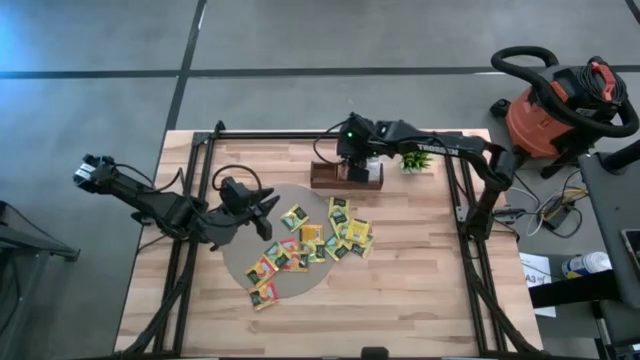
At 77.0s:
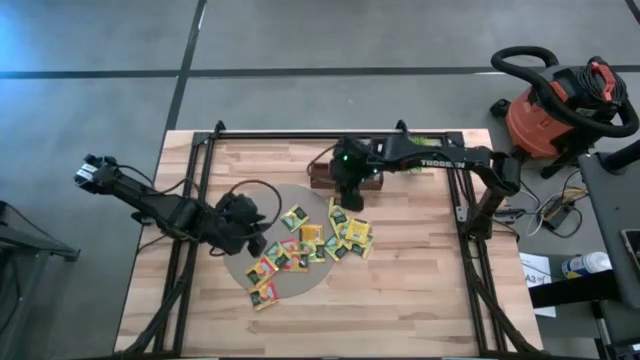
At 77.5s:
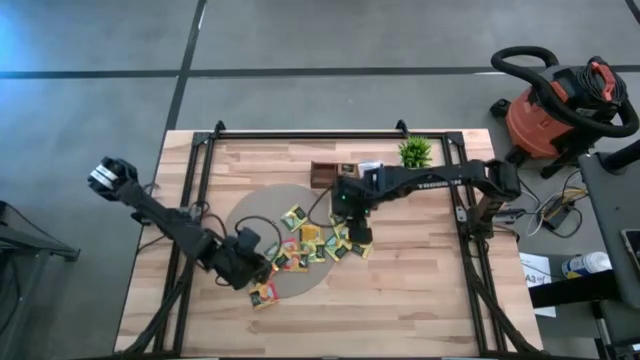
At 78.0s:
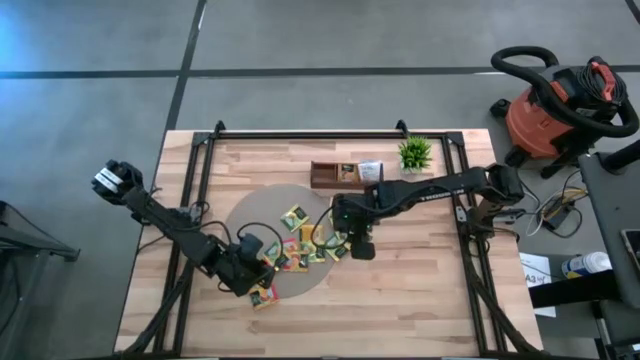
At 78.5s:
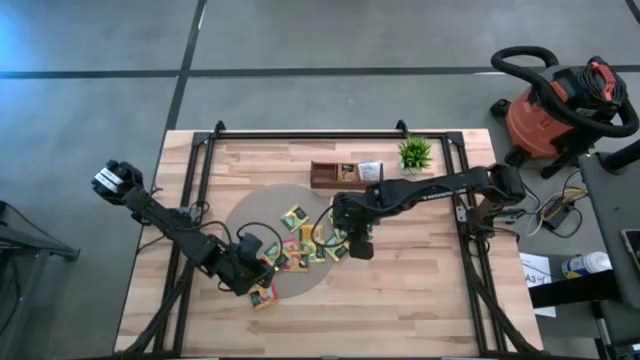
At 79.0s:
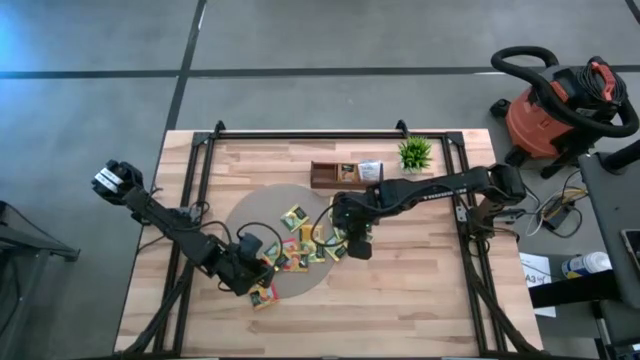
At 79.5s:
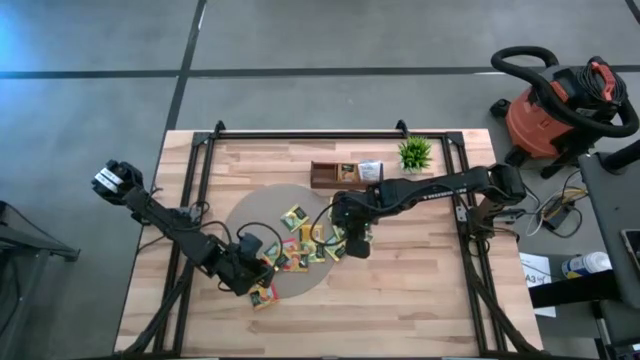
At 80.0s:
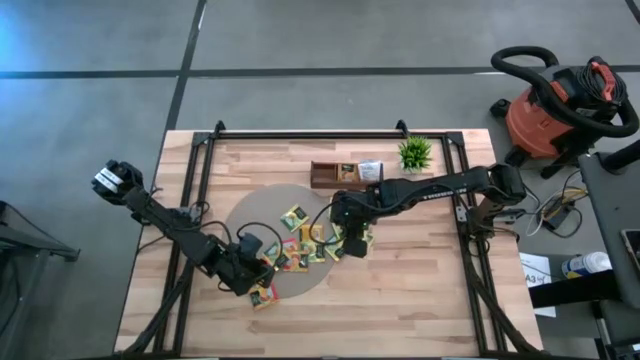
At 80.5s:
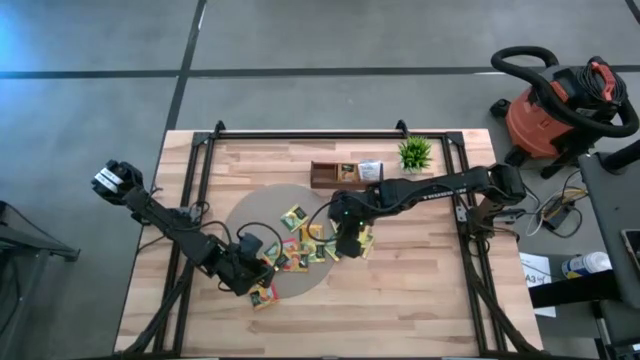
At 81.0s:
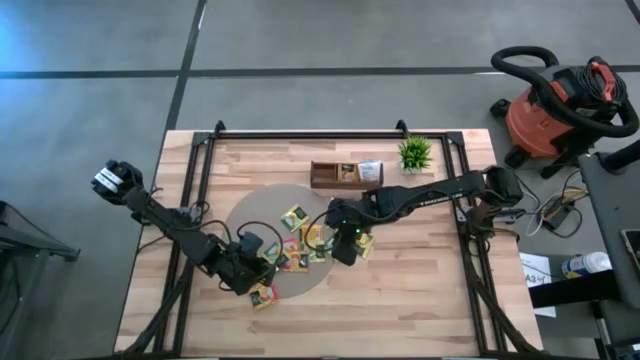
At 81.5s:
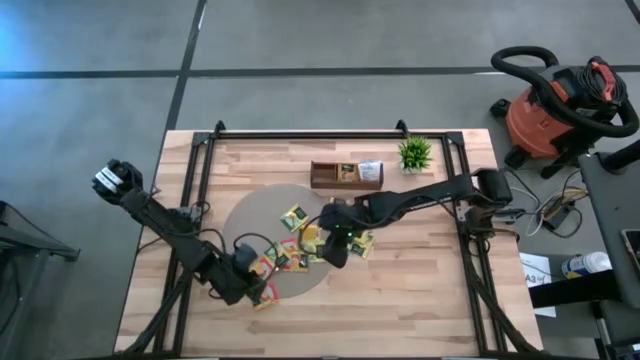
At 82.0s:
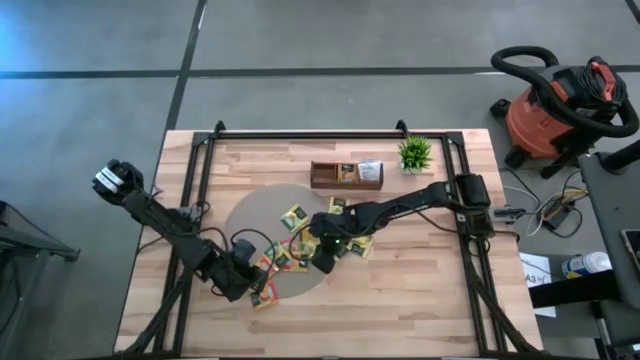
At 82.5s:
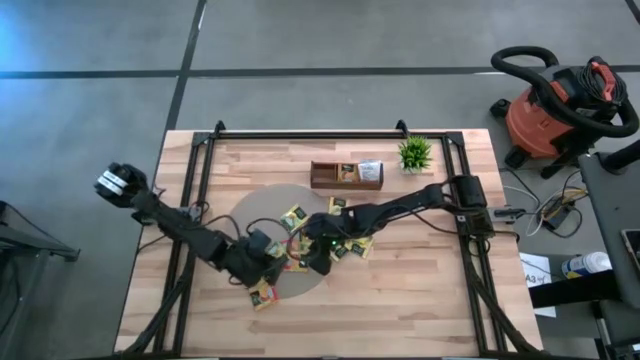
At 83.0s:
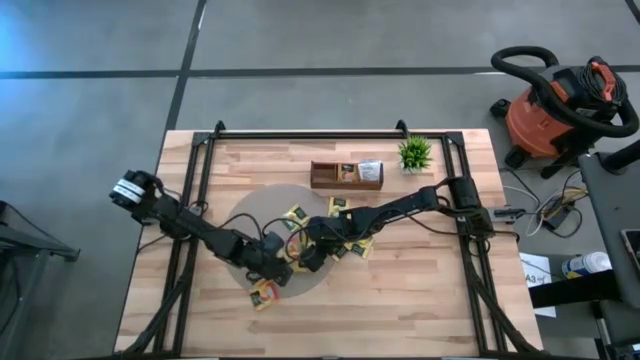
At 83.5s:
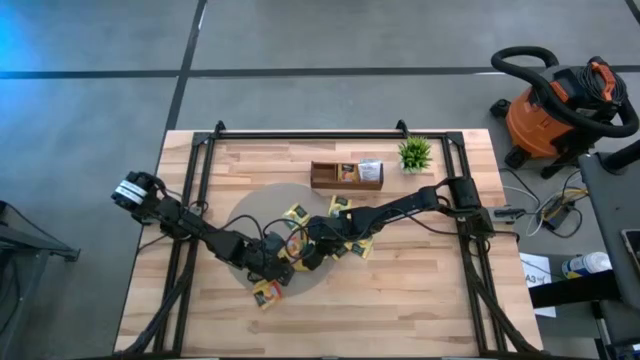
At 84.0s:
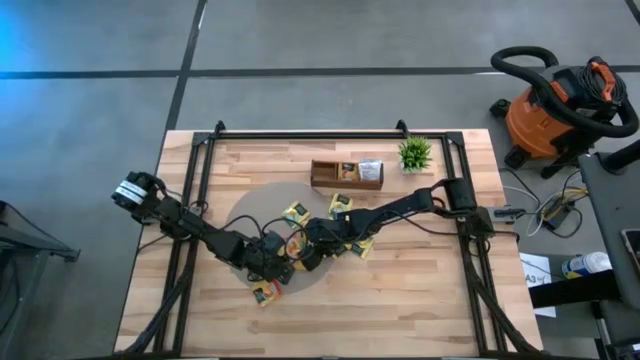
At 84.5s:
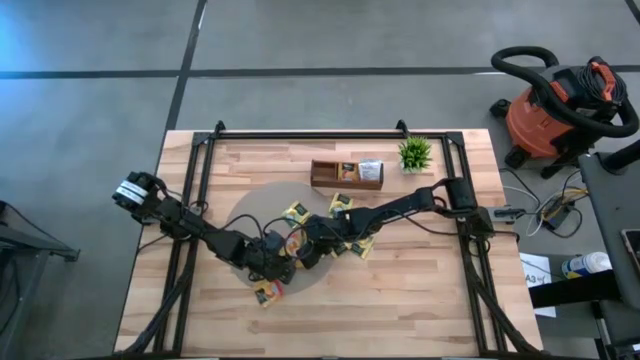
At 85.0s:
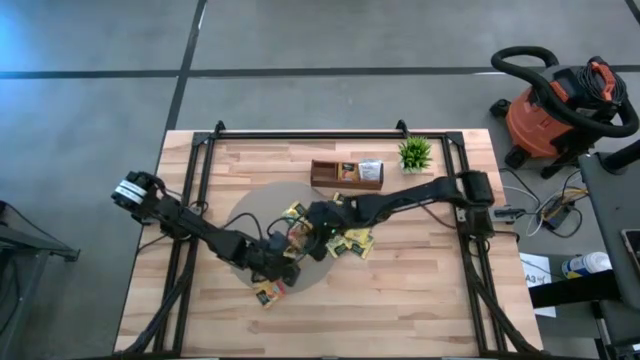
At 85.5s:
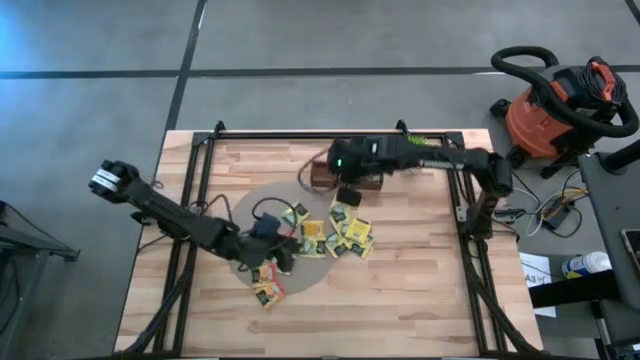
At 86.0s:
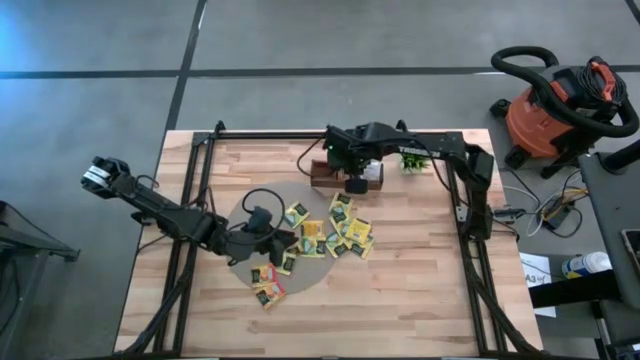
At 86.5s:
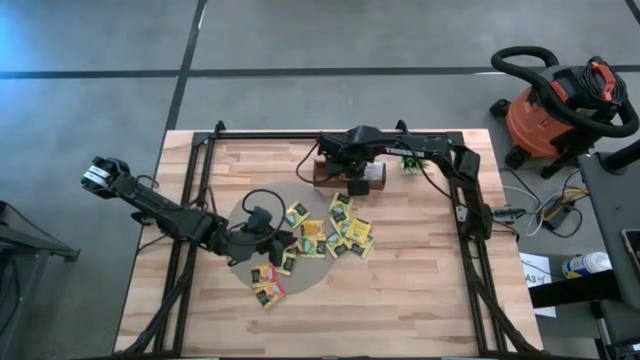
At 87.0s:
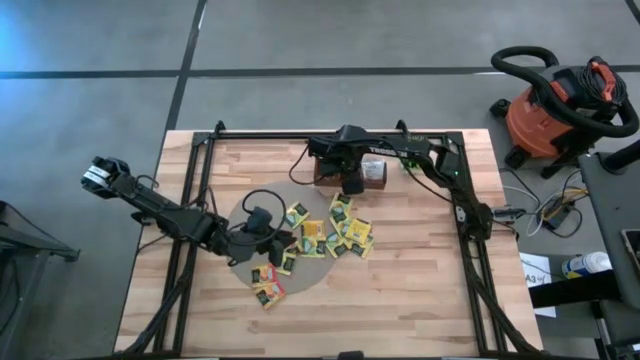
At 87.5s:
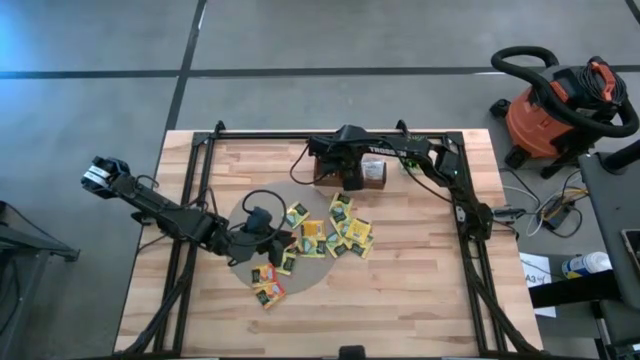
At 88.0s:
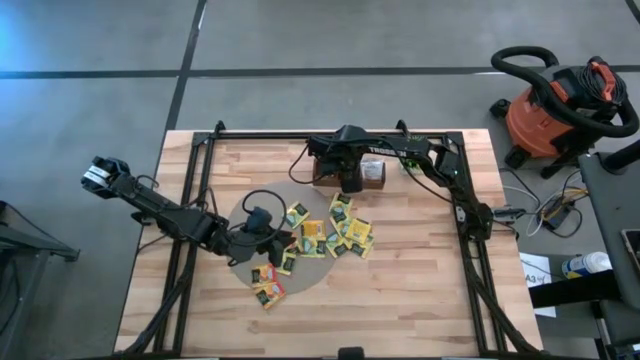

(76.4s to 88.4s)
Task: Pick & Place Tea
Put the red tea sachet into the middle compartment of the wooden organizer

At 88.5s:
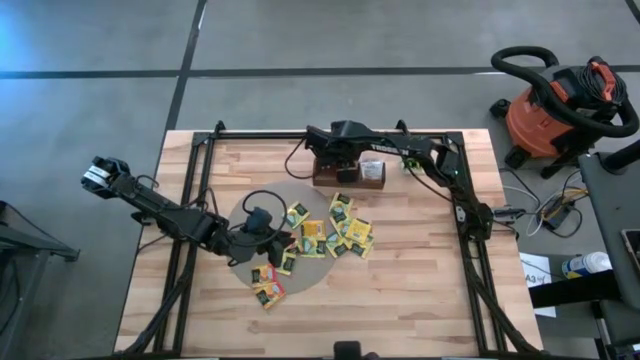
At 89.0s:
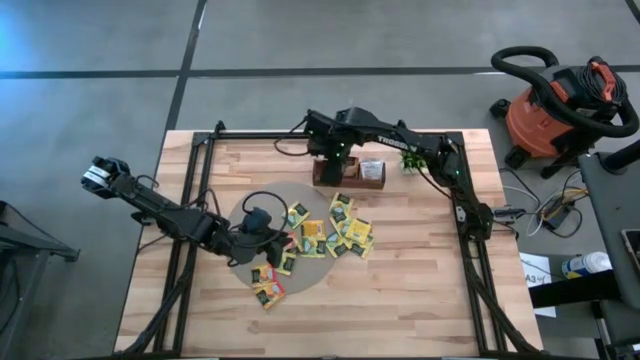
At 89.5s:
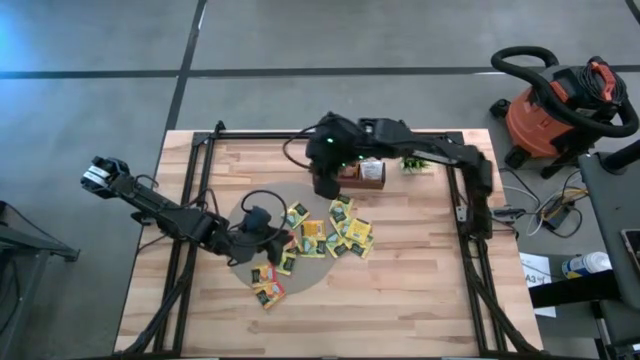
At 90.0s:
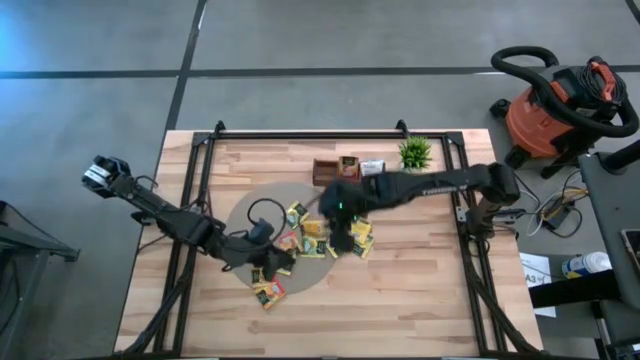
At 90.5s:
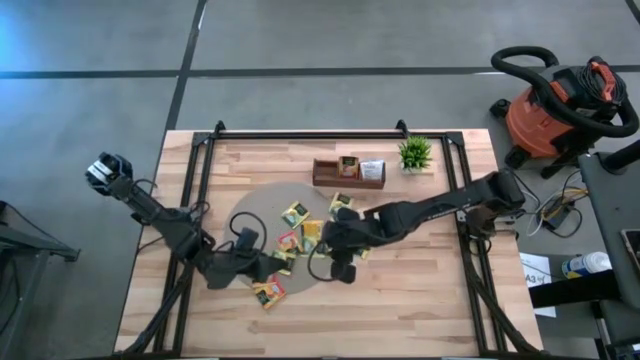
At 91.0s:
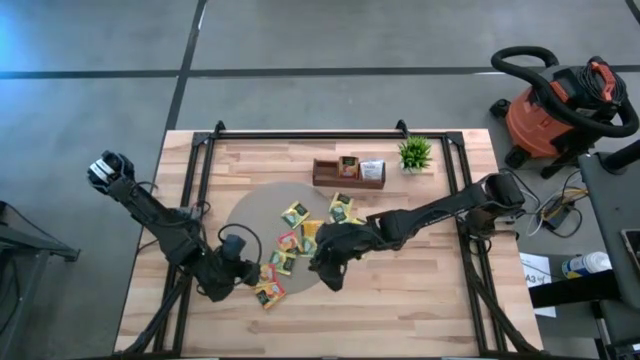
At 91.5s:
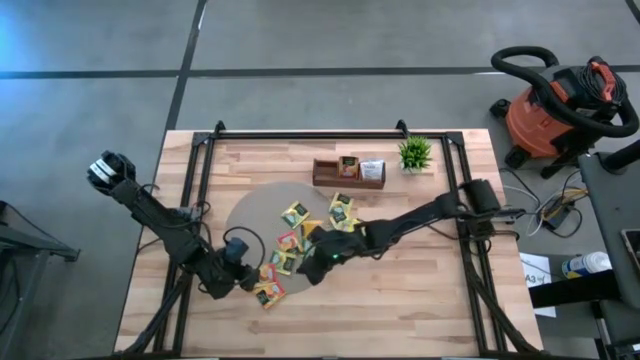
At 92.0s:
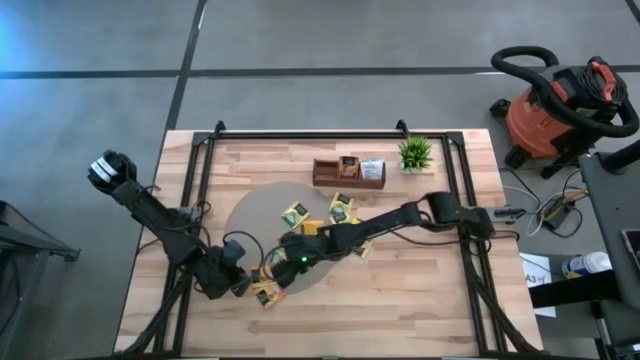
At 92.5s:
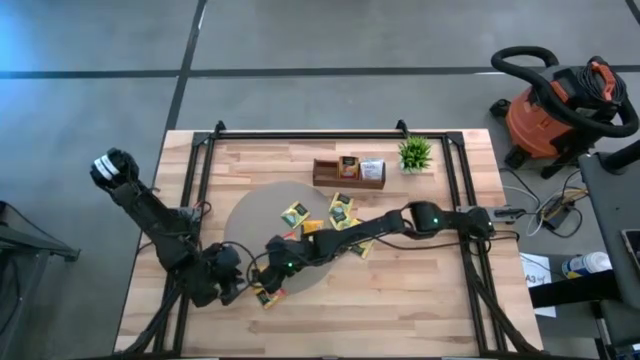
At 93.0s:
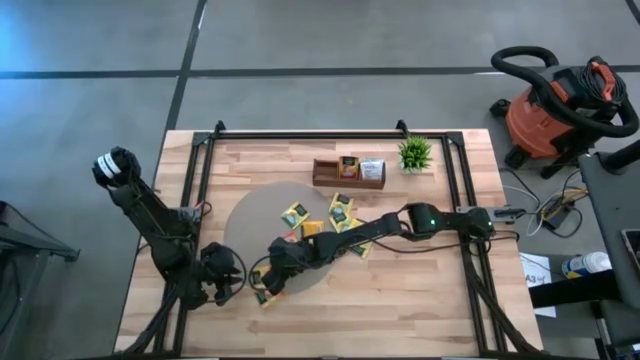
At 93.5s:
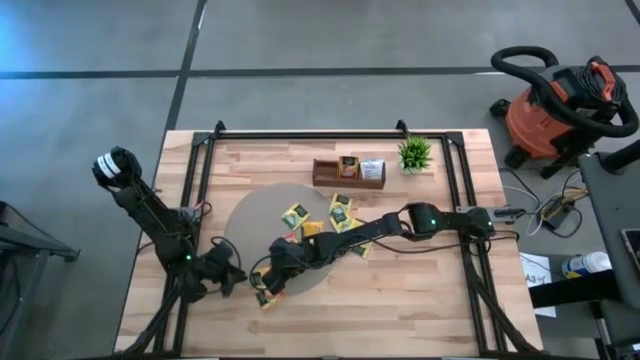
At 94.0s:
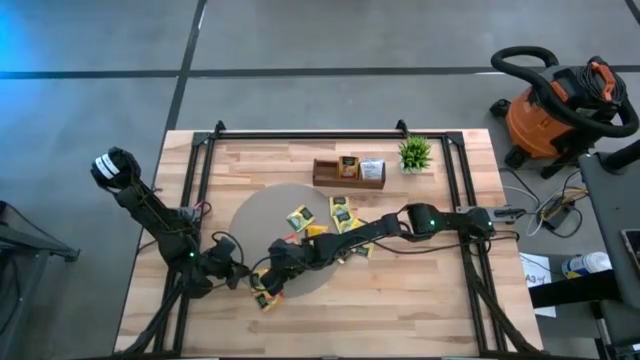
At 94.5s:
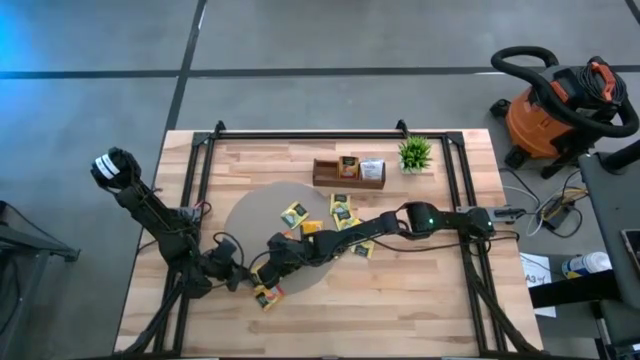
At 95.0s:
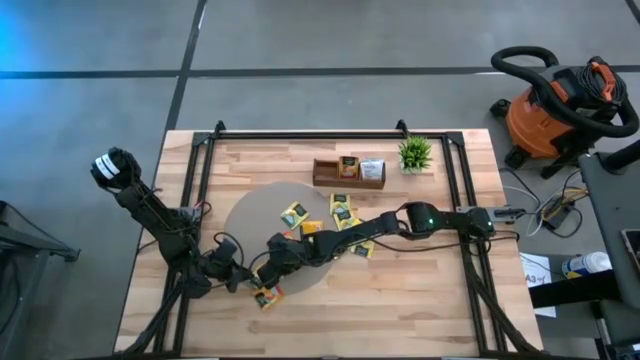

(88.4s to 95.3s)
Put the red tea sachet into the middle compartment of the wooden organizer

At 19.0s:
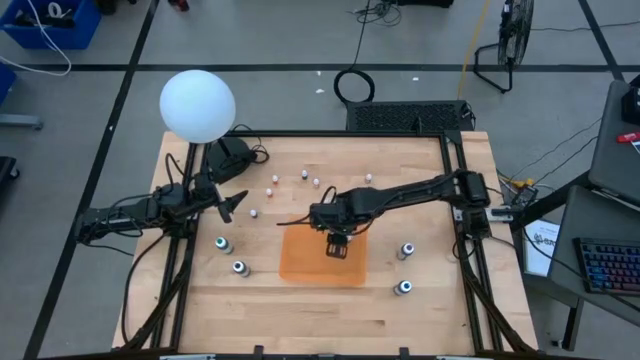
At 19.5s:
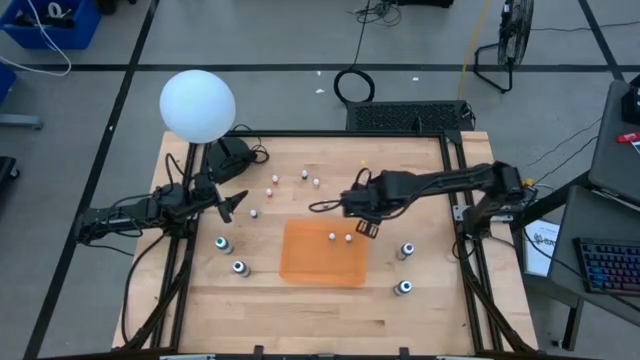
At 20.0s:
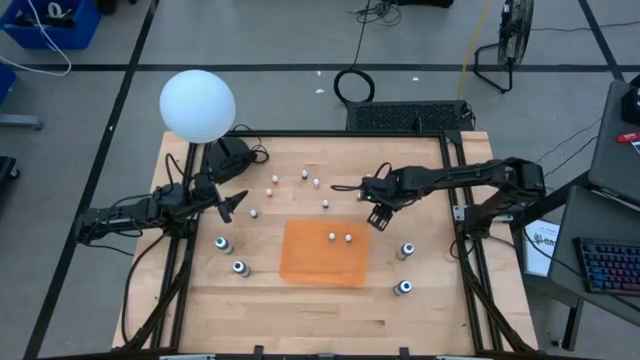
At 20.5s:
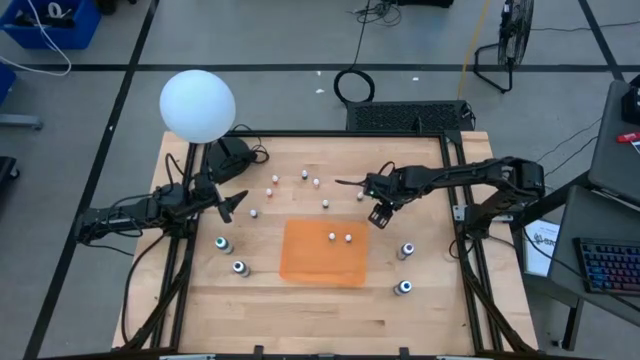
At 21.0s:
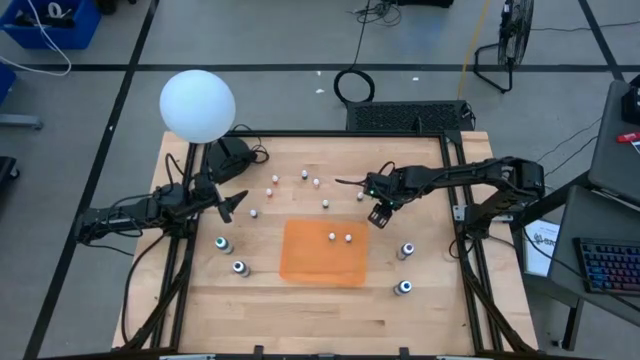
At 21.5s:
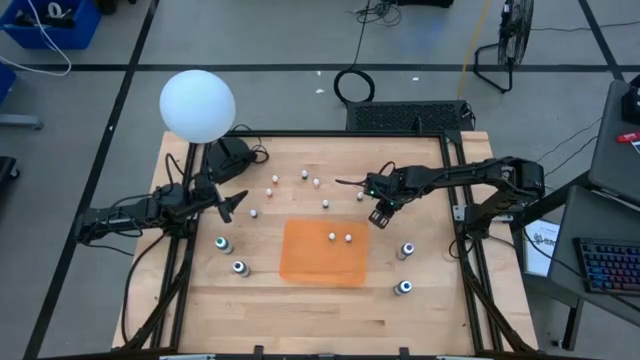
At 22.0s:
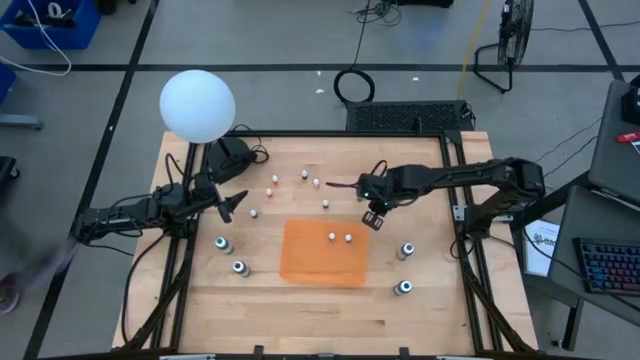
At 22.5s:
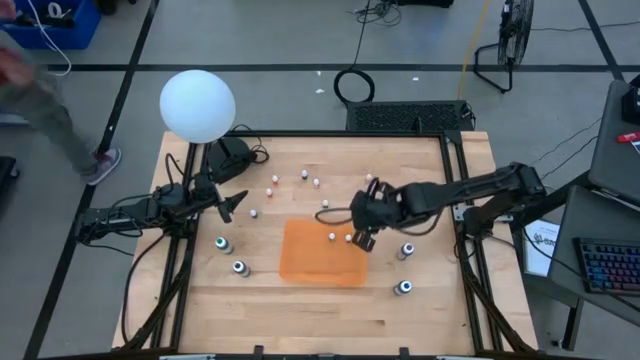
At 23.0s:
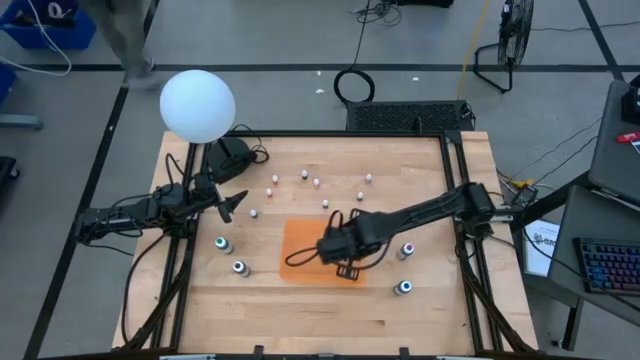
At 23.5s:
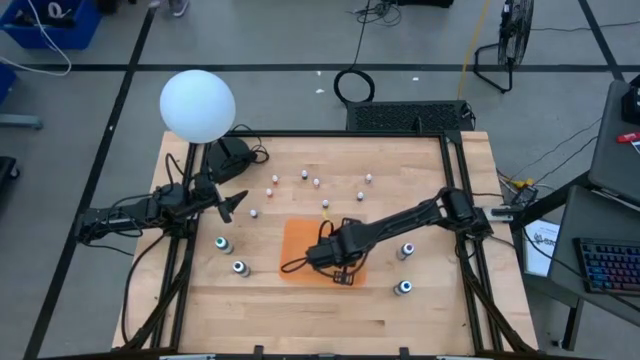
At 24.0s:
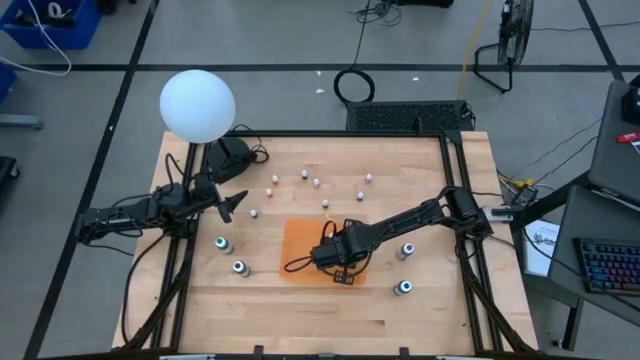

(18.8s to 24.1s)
Task: Pick & Place food coloring
Put the orange food coloring bottle into the orange bin
